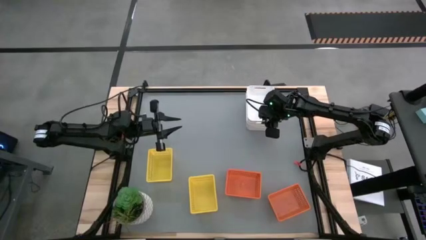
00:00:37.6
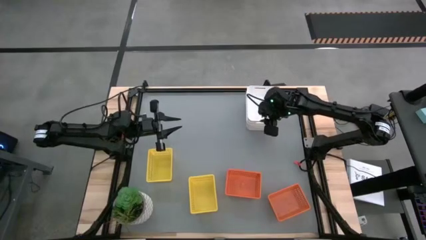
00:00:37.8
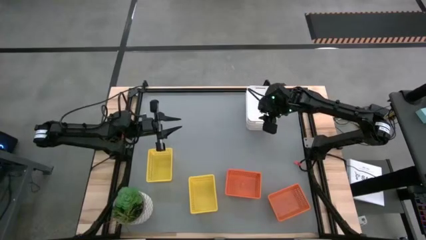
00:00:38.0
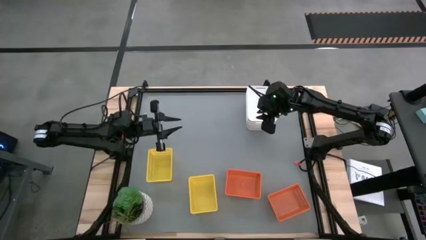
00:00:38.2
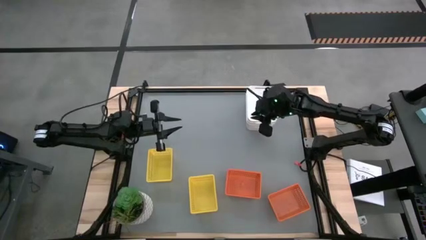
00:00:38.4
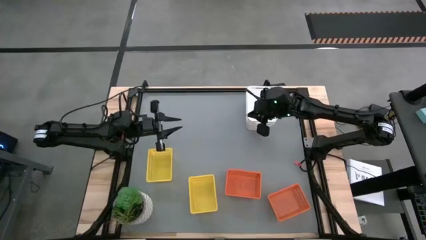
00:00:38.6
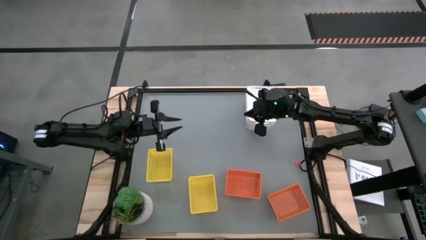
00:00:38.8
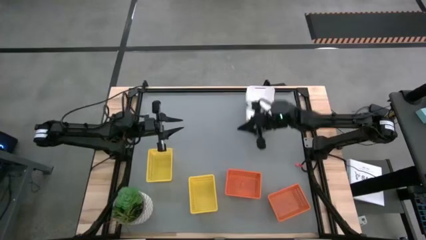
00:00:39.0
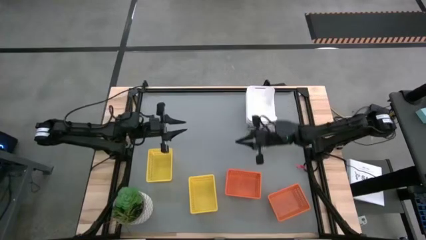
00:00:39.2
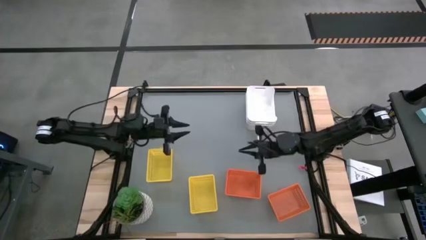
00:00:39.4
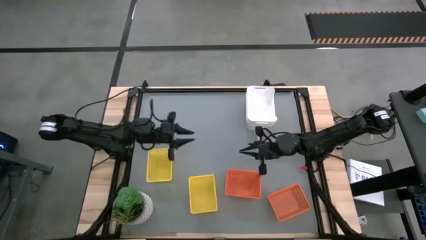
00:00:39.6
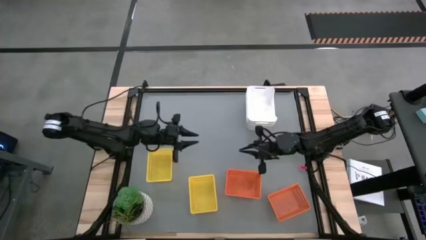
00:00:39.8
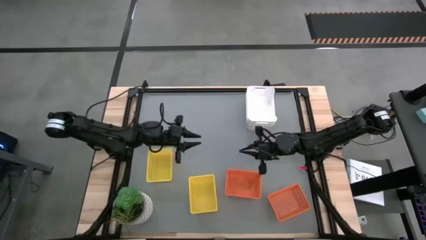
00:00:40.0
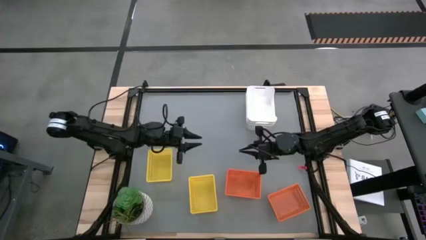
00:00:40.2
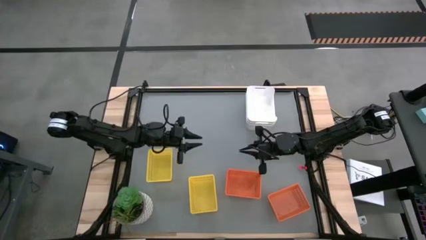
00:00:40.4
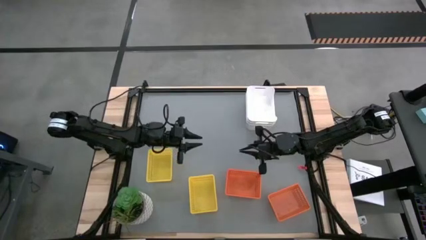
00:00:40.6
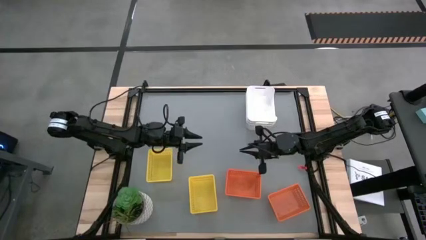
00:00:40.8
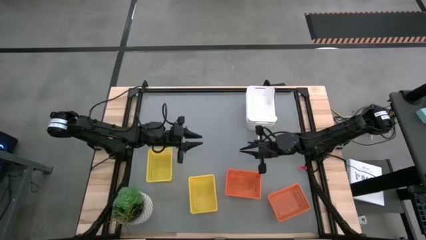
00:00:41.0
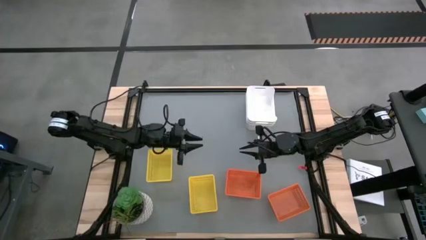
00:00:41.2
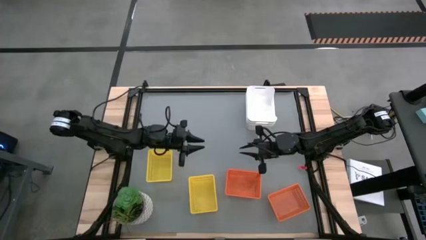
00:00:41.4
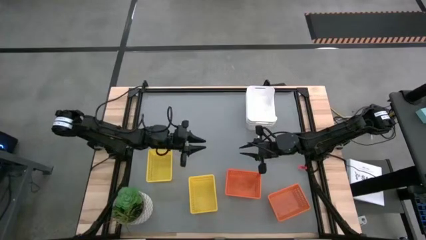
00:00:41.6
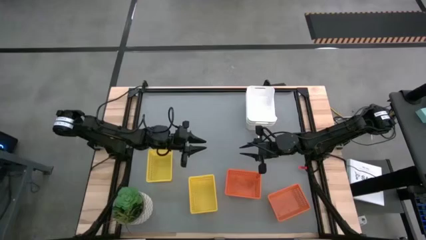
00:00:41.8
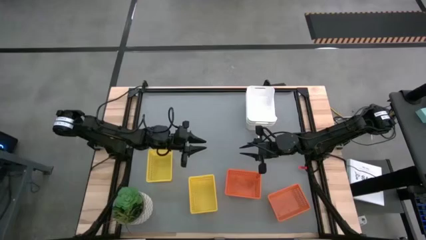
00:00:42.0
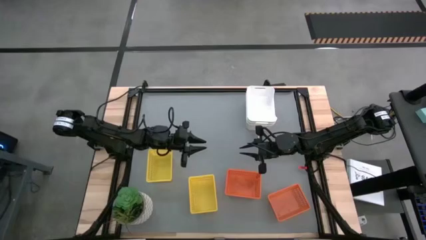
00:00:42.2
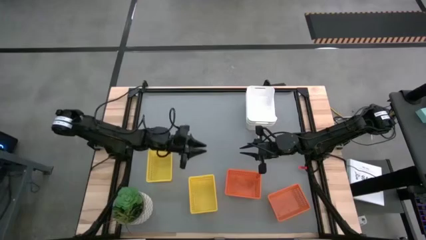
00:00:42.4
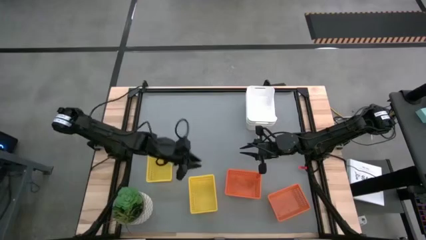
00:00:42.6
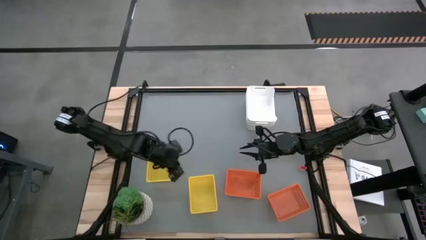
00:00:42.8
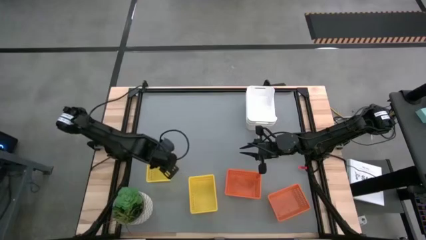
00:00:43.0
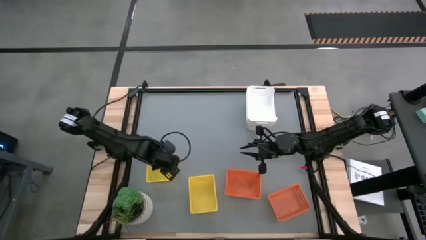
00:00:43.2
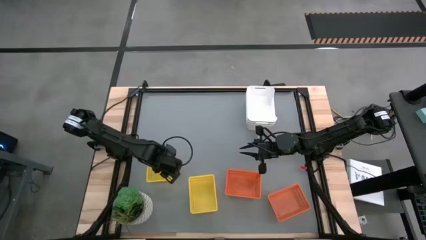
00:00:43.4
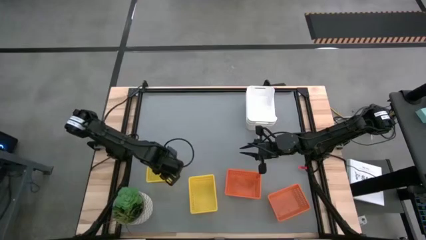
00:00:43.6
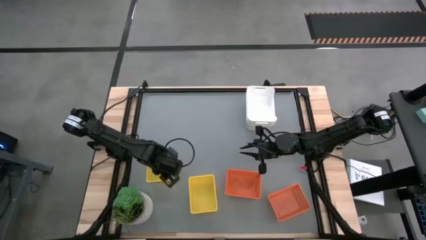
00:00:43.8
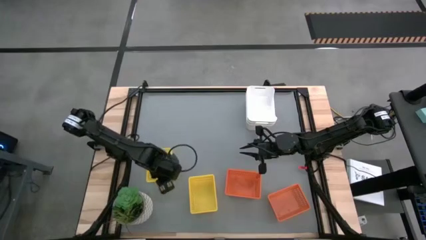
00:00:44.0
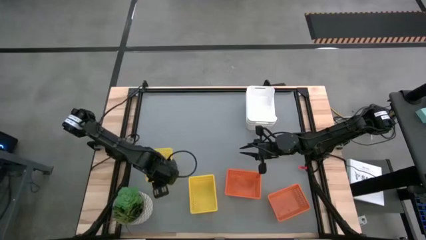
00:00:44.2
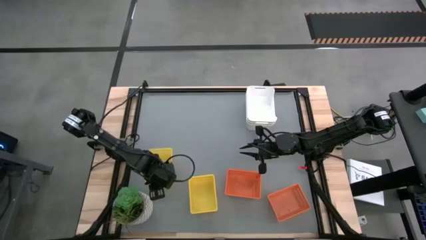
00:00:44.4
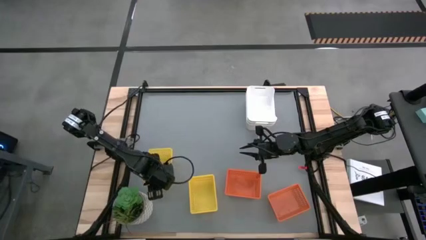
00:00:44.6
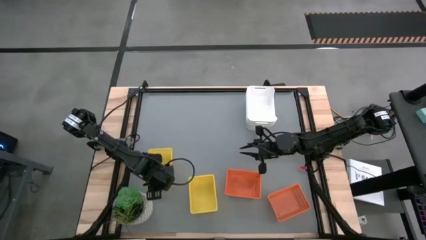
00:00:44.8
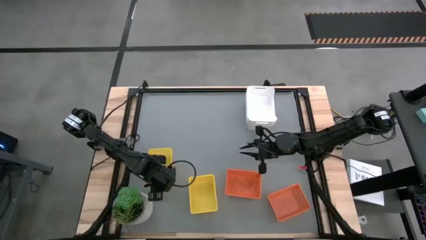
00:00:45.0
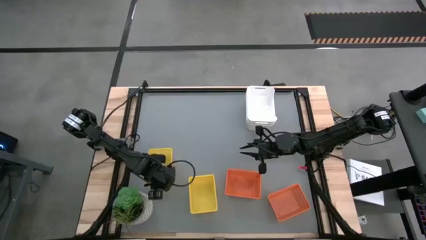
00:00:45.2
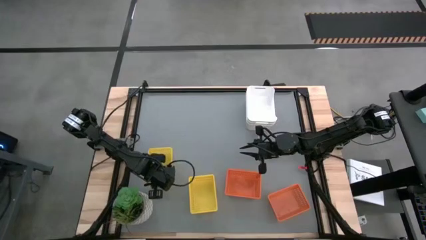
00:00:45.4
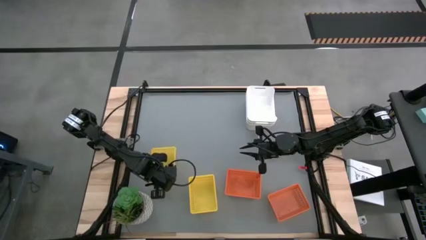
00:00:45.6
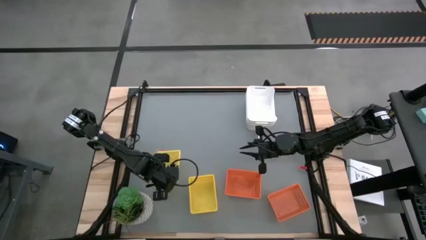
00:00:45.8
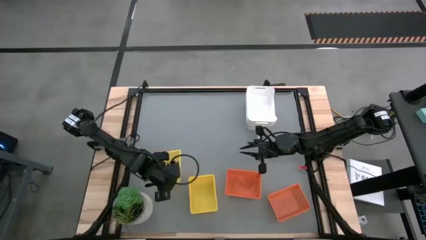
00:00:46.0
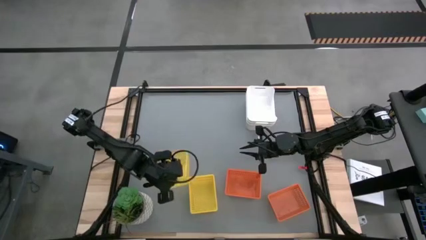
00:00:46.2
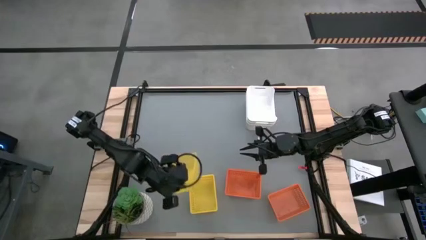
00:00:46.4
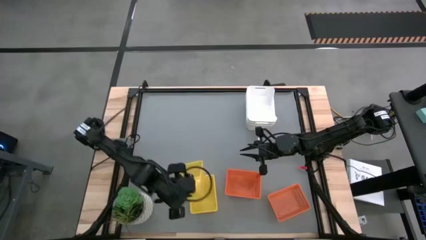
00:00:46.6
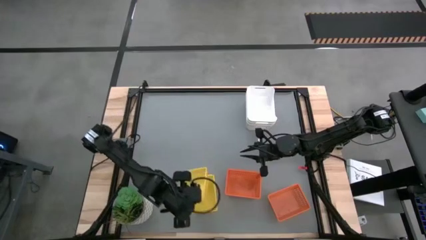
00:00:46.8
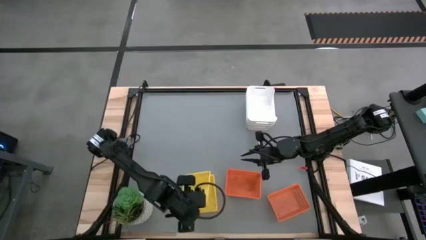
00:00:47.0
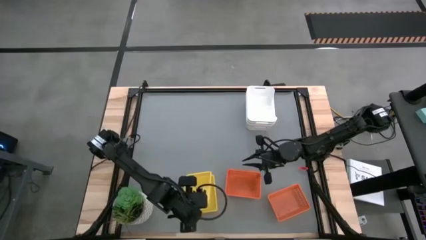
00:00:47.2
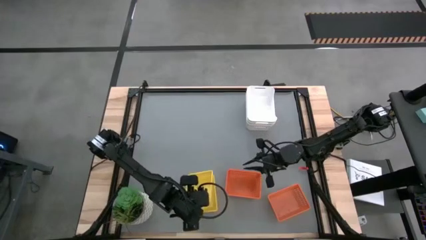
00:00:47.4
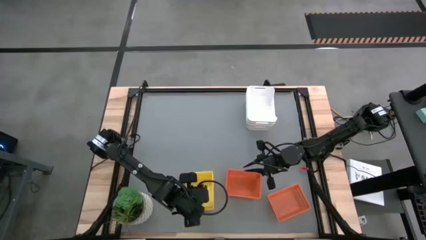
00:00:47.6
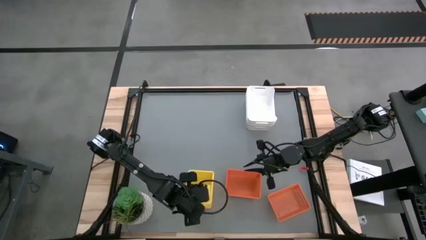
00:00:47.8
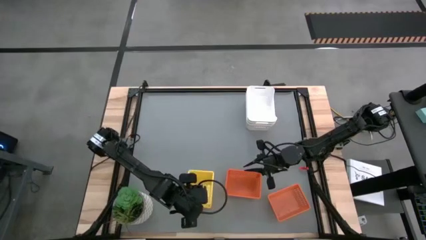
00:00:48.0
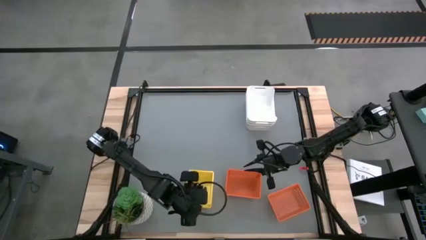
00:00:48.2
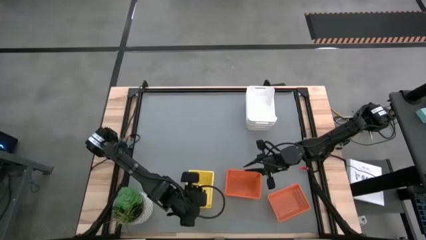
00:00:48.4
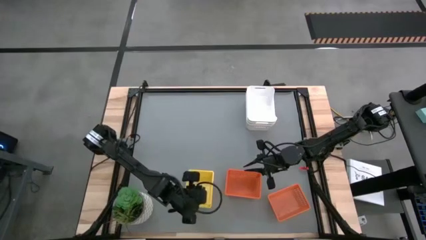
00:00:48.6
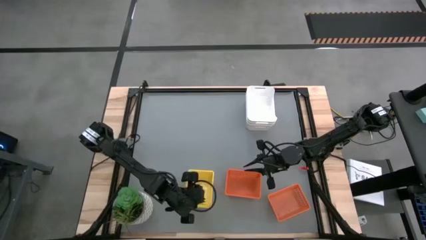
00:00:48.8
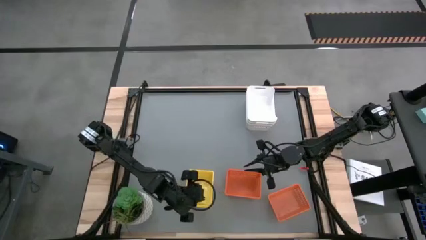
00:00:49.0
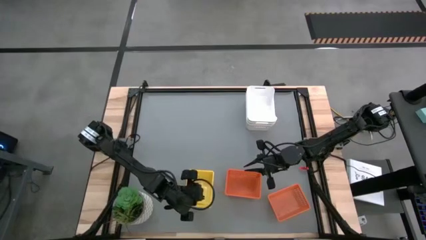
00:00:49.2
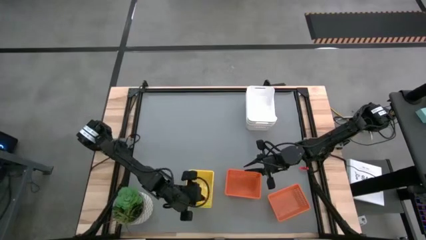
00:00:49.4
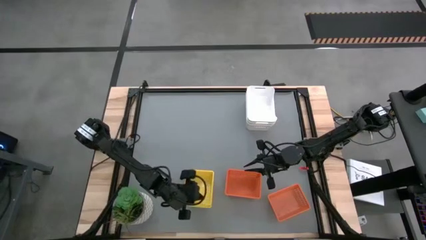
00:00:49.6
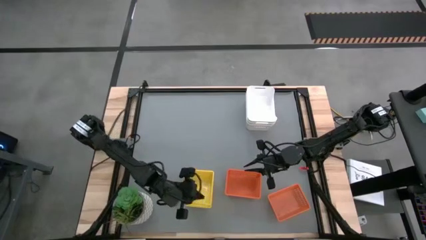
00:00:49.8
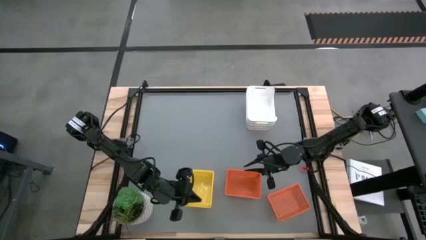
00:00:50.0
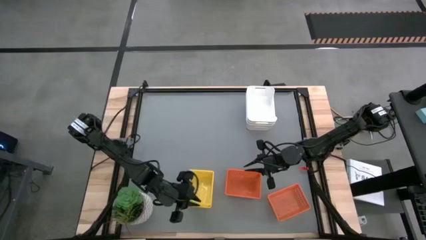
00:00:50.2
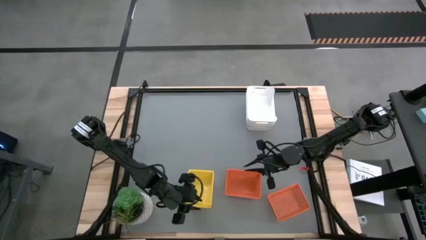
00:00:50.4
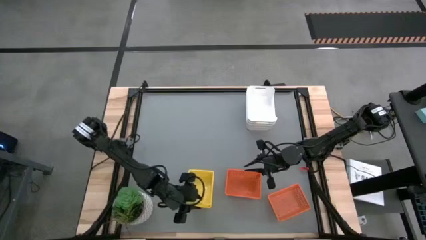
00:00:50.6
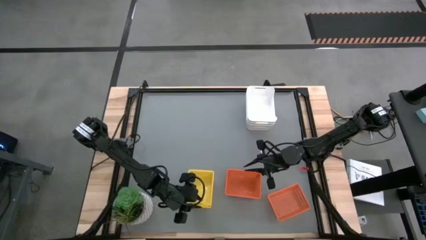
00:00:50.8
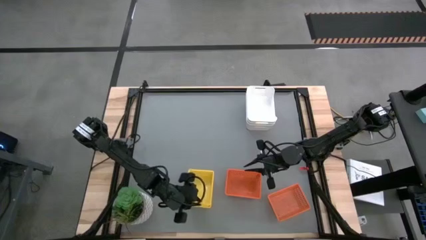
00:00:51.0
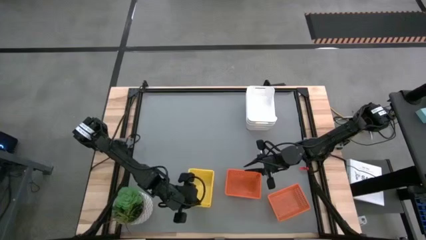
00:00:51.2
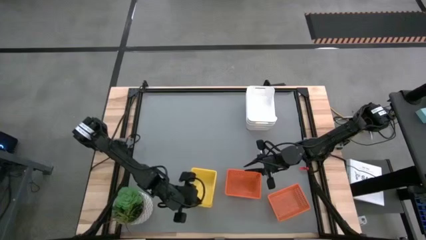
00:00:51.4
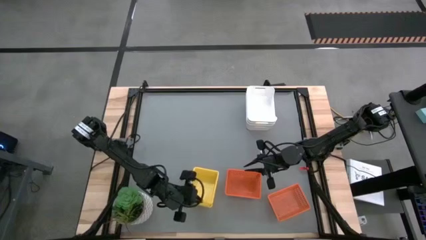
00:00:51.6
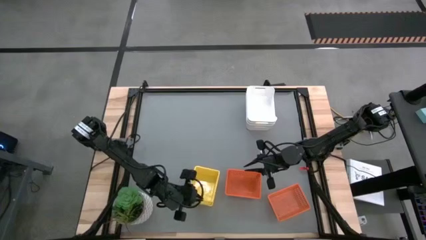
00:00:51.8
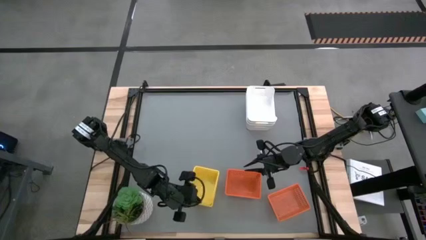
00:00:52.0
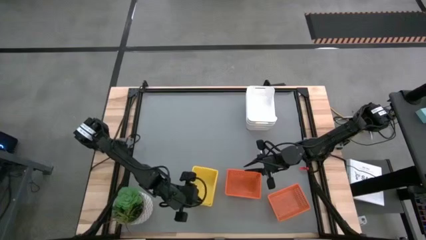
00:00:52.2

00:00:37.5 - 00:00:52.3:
Stack the left yellow bin on top of the right yellow bin

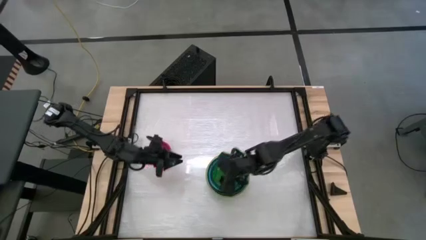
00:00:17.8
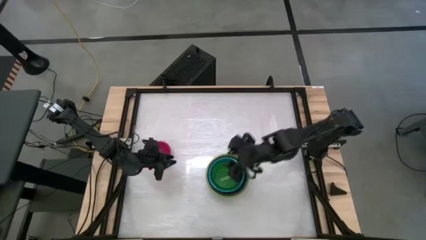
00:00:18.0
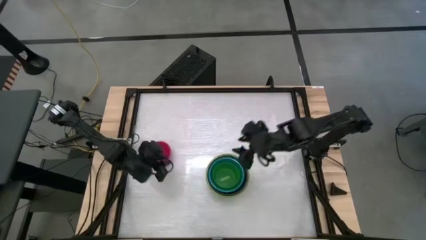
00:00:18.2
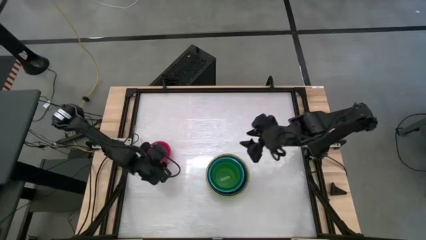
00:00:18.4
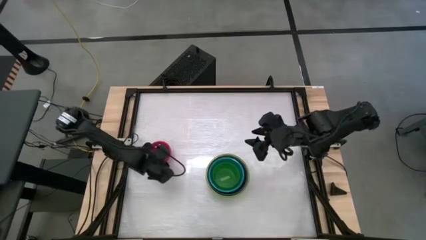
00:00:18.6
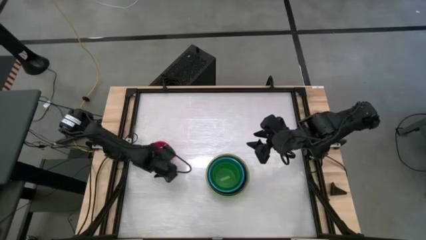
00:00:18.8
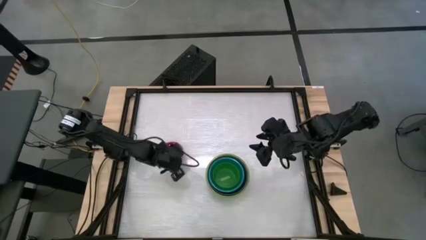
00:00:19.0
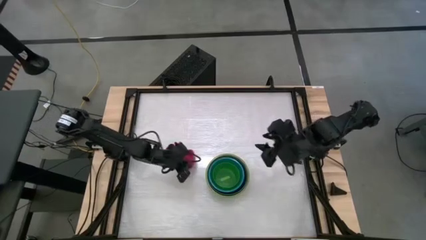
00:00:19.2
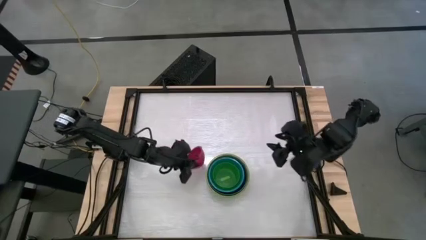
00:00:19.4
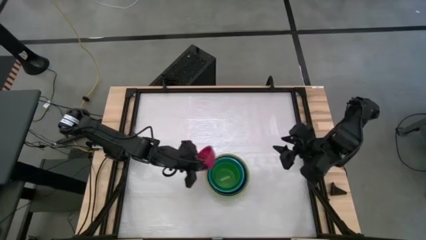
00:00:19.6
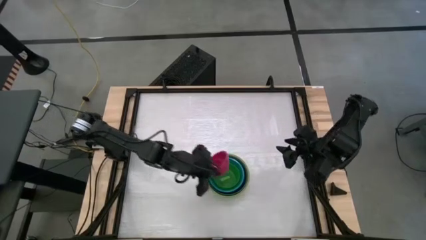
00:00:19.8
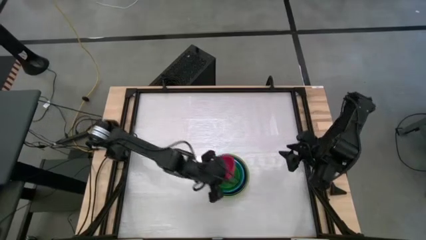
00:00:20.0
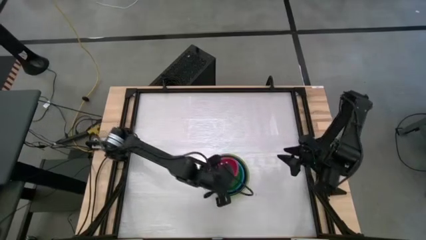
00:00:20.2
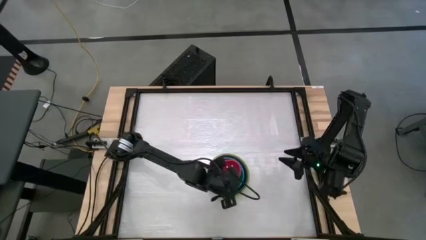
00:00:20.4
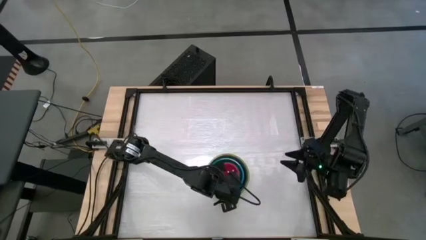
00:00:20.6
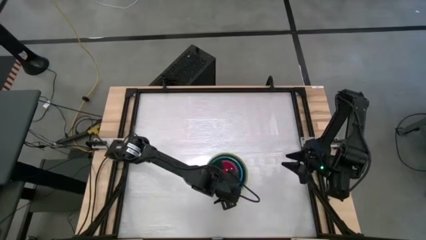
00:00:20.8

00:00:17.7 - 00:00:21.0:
Stack the pink bowl on the green bowl
